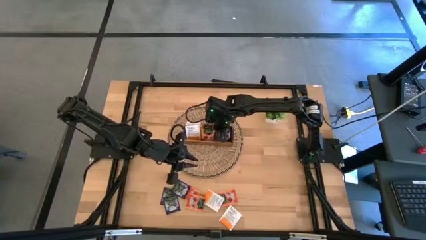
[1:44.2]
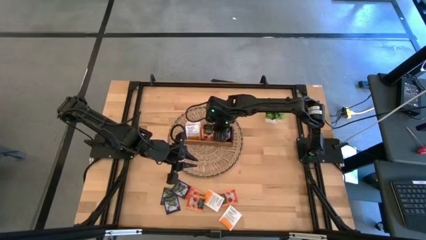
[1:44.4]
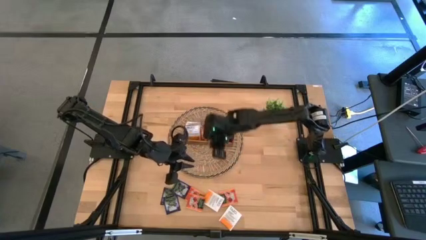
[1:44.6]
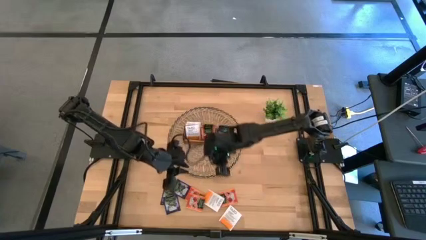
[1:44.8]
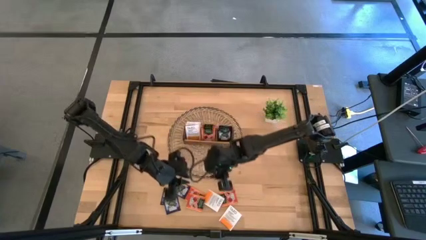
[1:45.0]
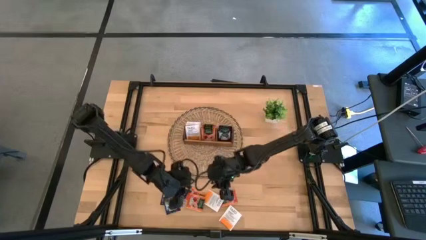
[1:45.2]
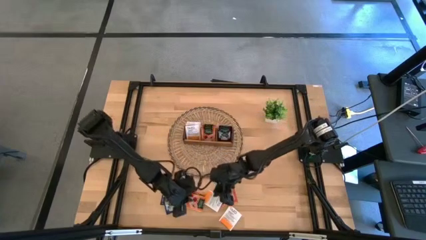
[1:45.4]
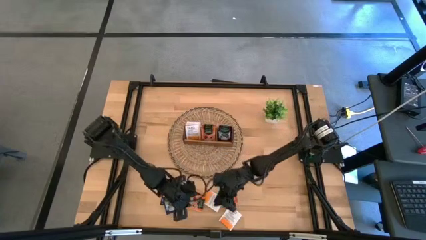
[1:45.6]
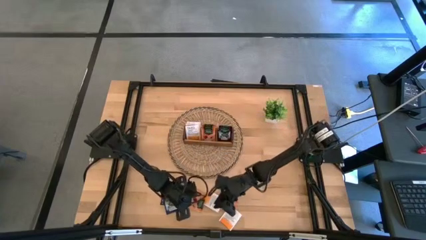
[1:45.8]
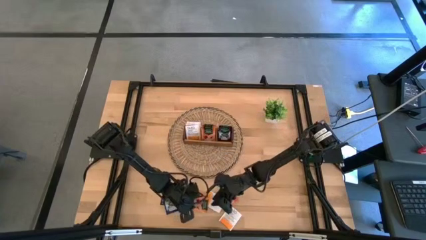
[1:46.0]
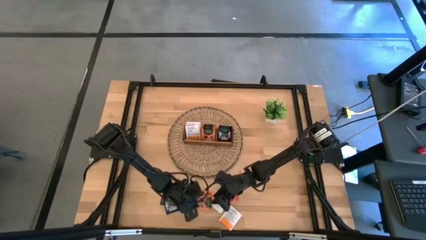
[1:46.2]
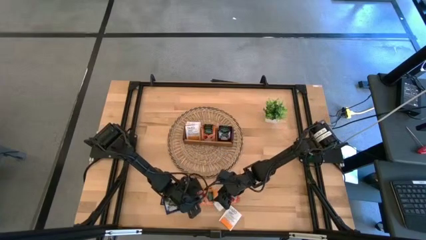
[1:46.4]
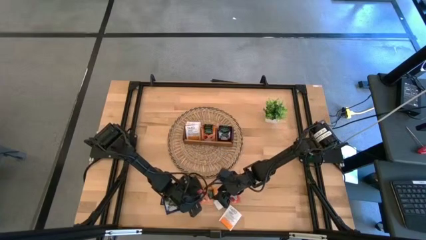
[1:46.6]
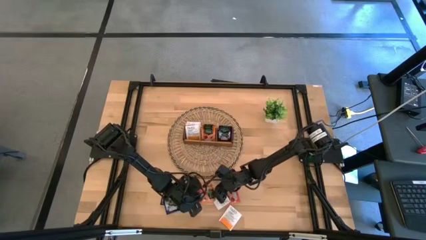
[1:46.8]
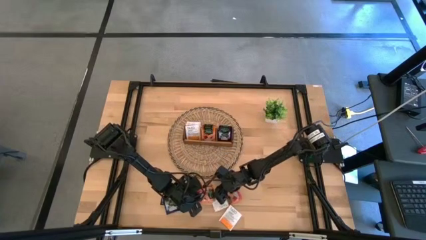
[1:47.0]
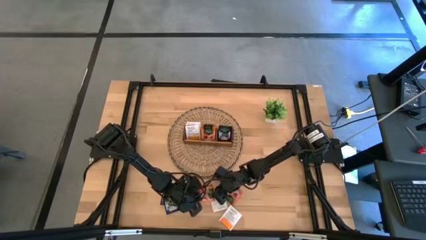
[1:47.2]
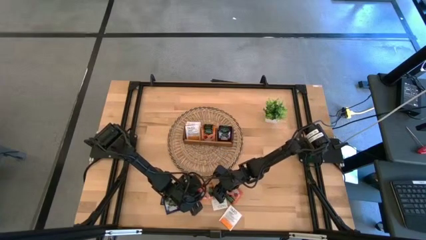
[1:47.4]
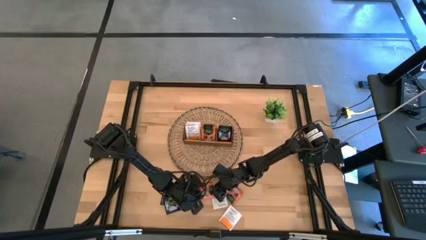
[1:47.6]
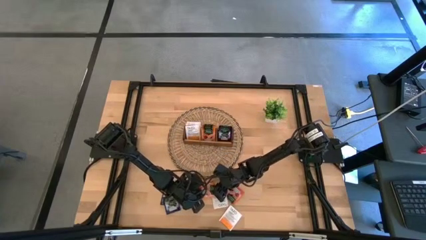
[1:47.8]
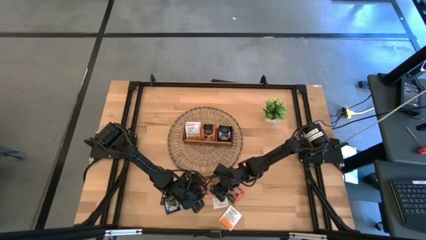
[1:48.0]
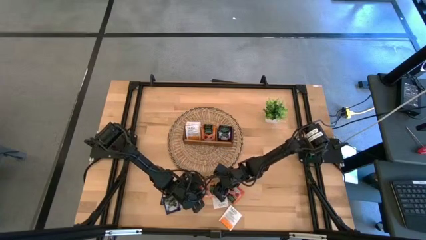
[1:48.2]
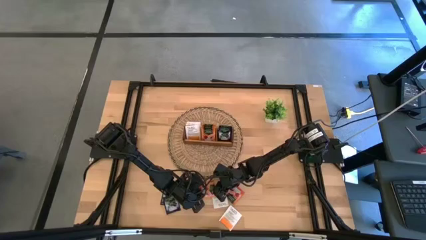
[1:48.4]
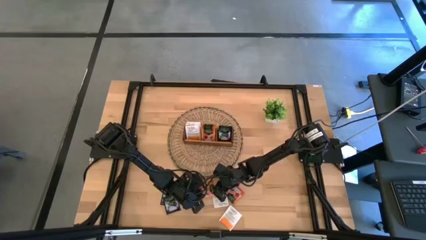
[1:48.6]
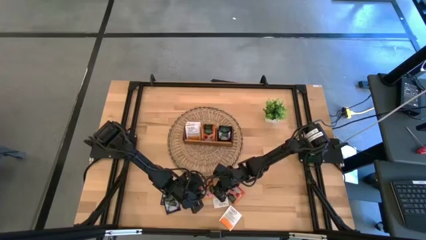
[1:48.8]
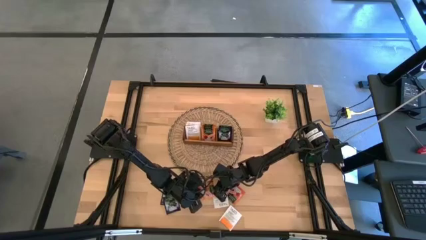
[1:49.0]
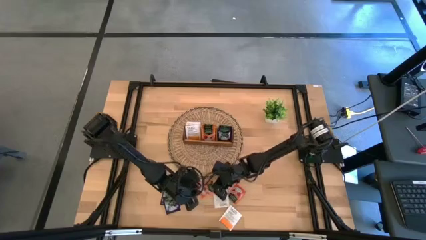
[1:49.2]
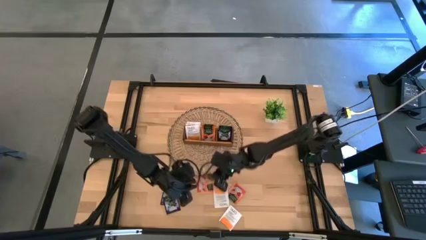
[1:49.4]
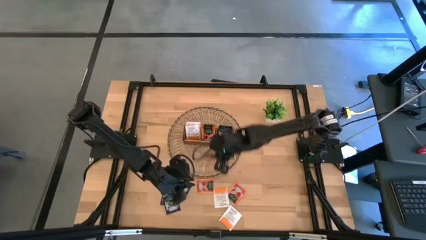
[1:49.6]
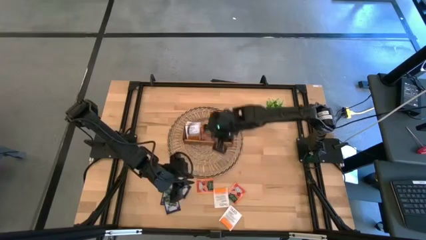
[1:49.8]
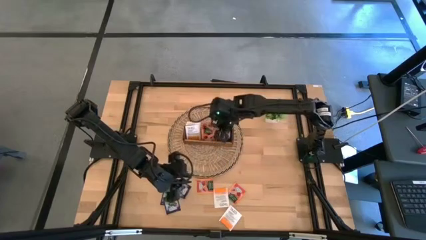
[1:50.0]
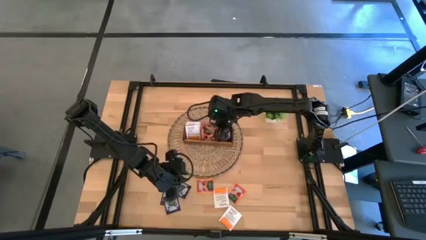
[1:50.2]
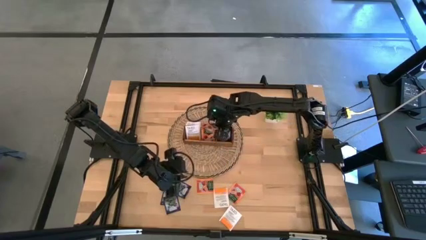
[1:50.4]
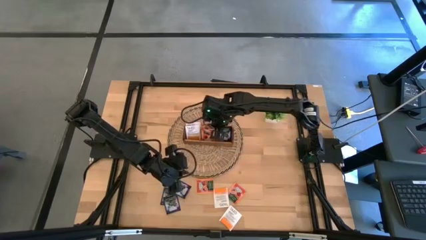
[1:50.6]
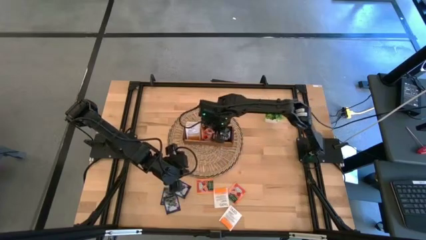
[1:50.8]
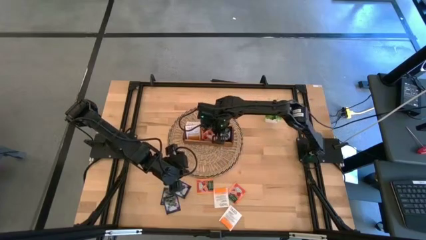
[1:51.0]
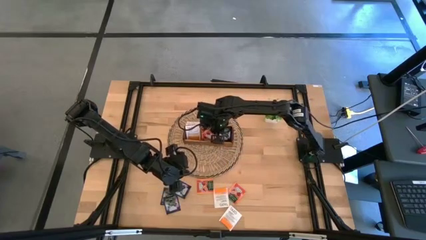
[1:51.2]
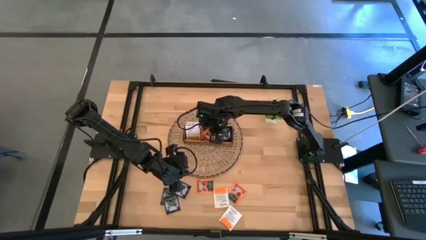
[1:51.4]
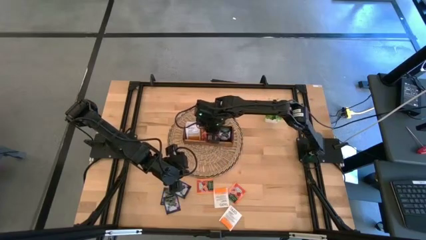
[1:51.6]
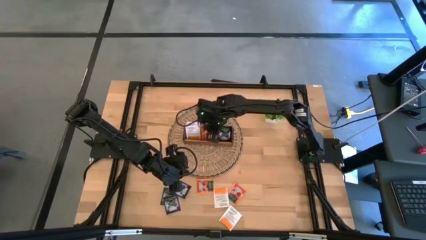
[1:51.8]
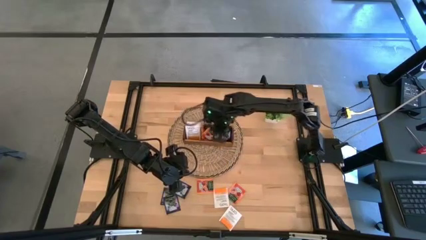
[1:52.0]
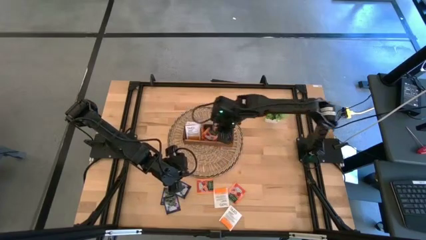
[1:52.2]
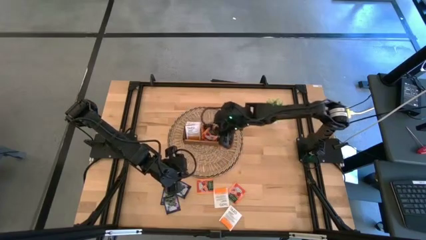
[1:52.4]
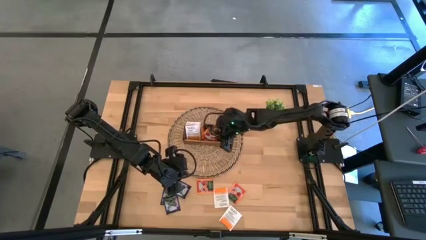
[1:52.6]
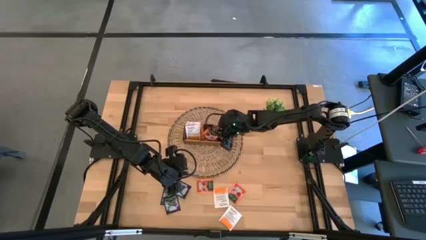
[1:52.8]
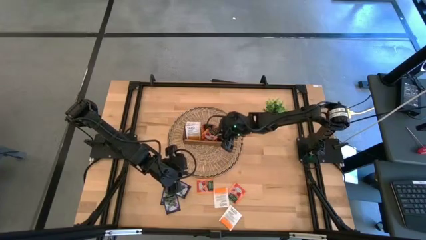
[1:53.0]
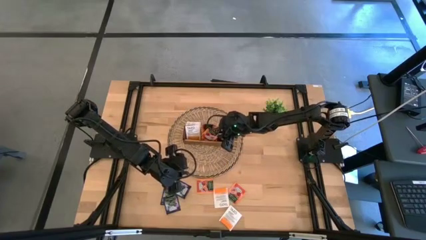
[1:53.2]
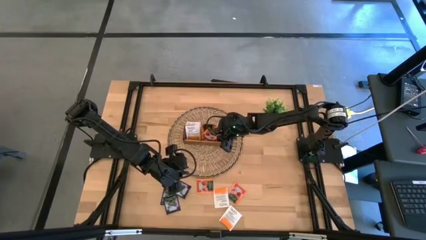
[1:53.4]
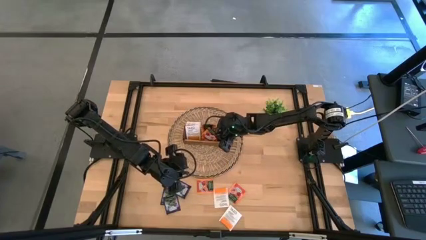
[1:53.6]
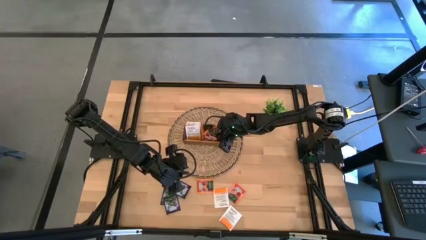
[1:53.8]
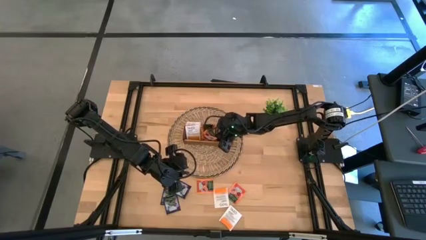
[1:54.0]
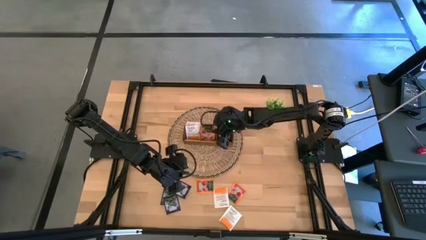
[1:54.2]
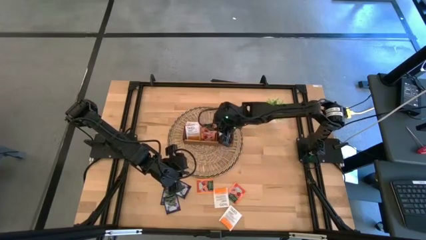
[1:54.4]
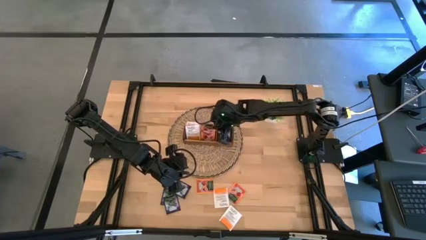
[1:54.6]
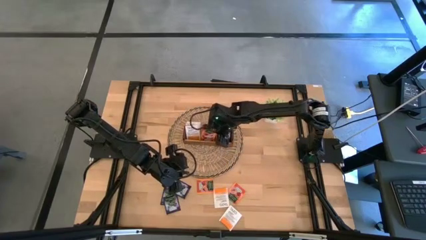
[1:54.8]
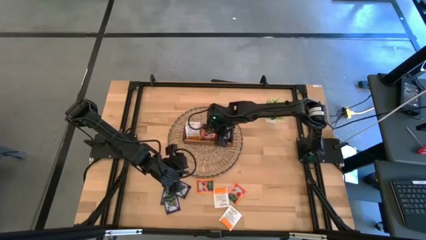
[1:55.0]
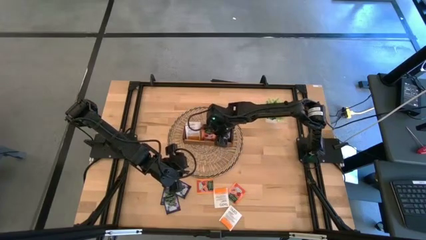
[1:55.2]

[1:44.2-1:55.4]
Task: Pick & Place Tea
Put the orange tea bag into the middle section of the wooden organizer

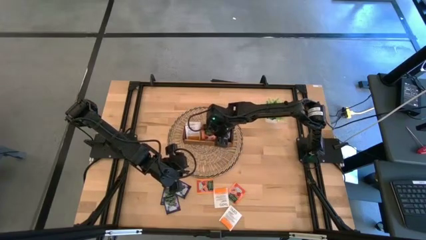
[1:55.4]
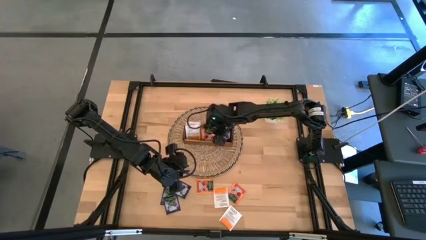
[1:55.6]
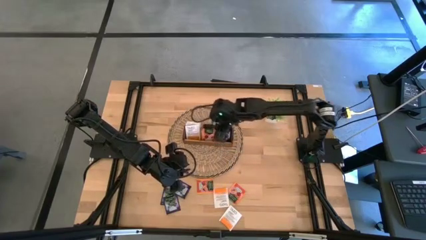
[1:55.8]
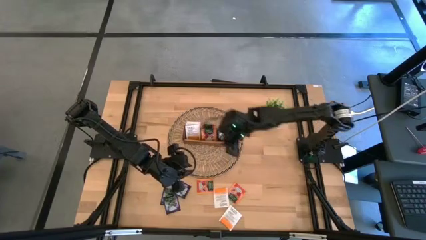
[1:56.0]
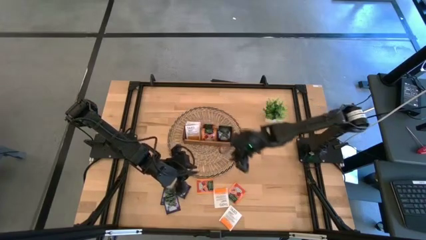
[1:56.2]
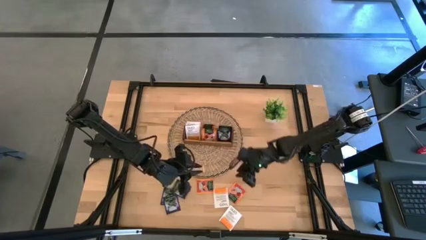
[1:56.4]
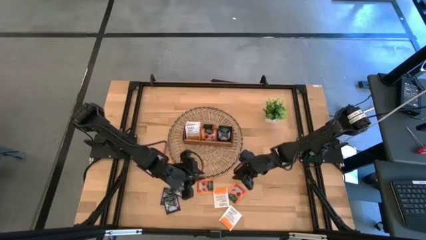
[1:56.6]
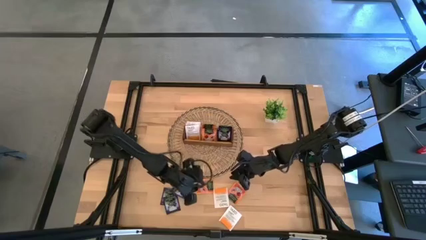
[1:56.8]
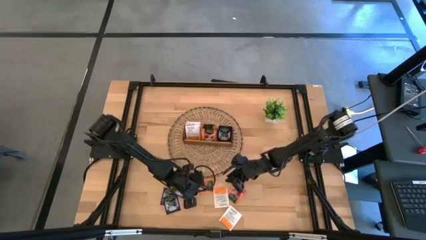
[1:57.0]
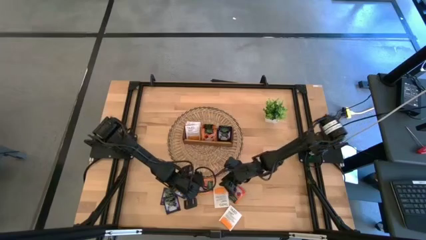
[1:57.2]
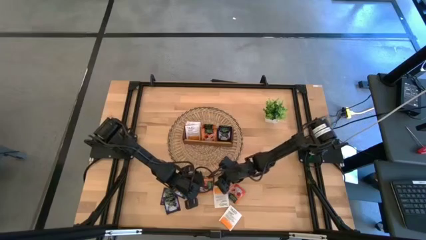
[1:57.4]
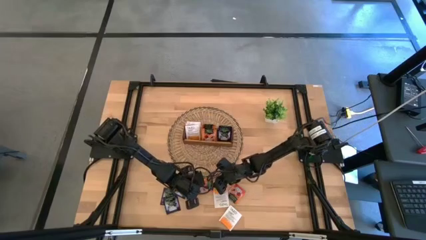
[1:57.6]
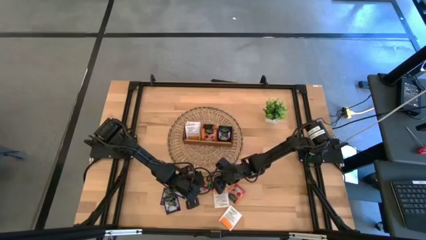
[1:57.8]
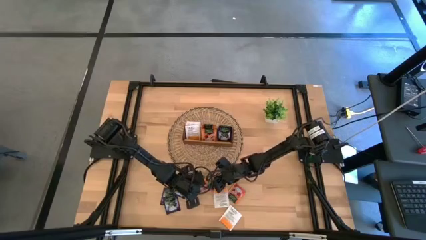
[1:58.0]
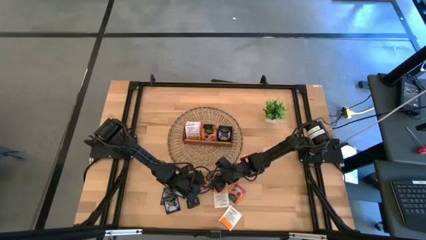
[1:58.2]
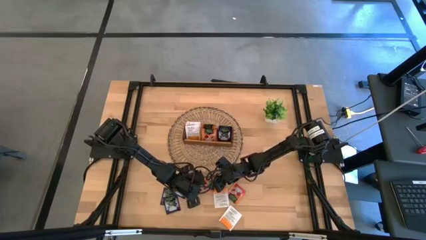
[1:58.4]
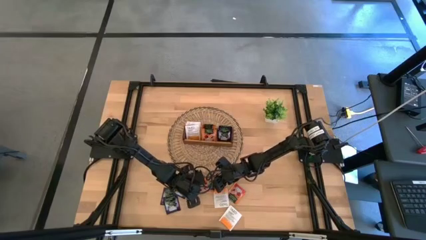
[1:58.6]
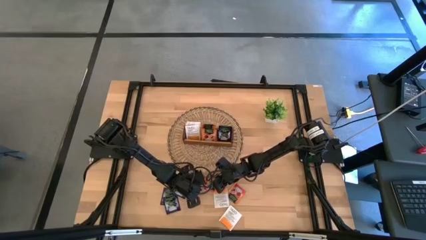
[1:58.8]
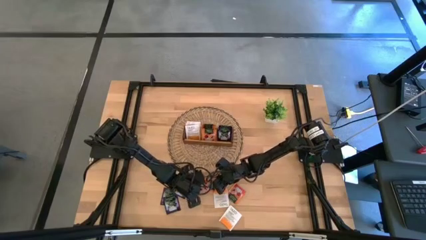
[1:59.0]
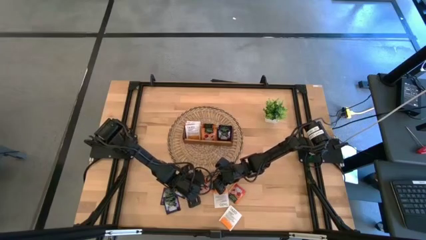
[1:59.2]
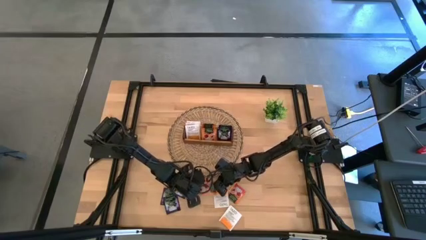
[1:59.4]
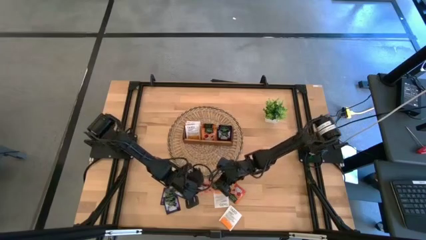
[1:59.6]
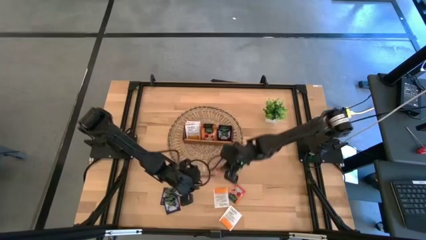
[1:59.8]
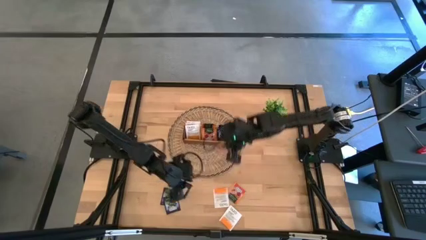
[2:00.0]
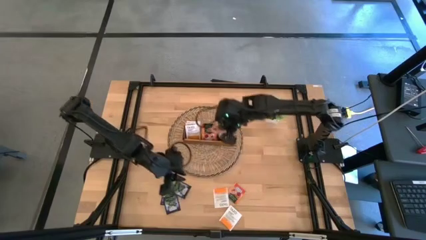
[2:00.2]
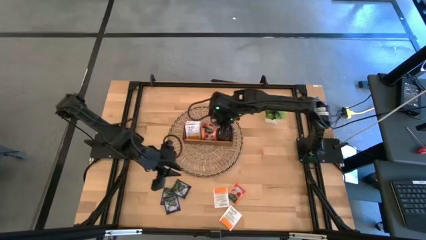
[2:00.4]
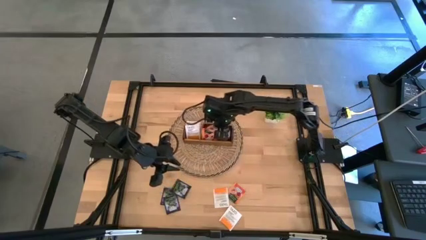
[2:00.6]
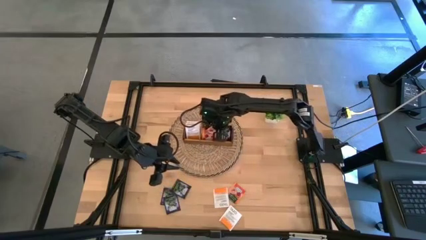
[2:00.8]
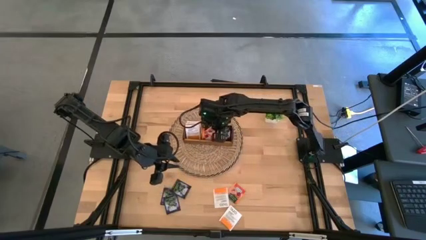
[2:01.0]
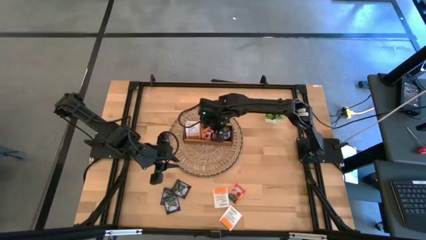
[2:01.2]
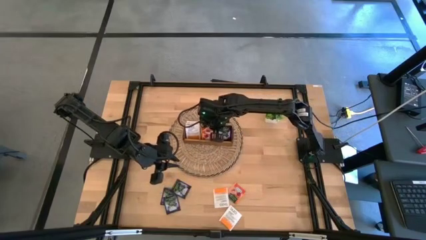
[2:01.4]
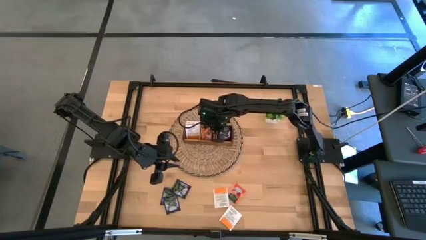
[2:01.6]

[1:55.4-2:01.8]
Put the orange tea bag into the middle section of the wooden organizer
